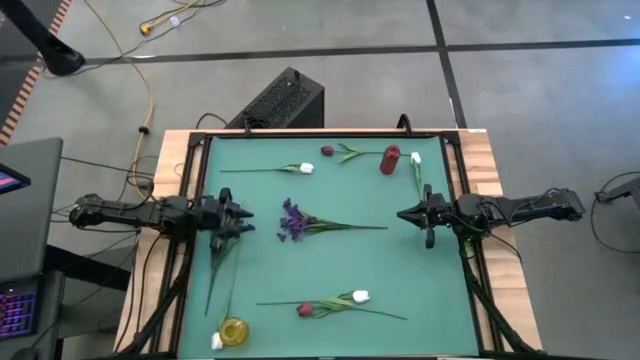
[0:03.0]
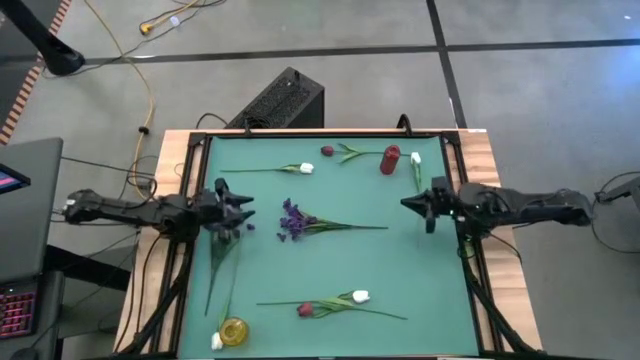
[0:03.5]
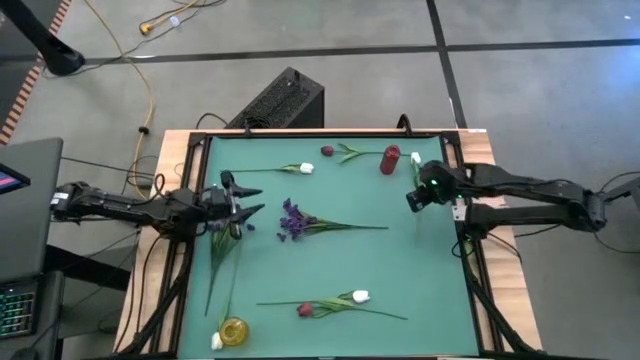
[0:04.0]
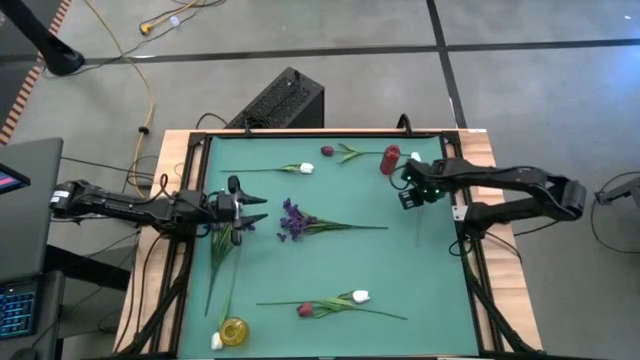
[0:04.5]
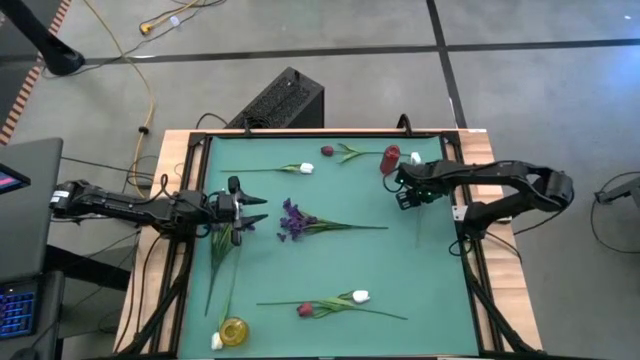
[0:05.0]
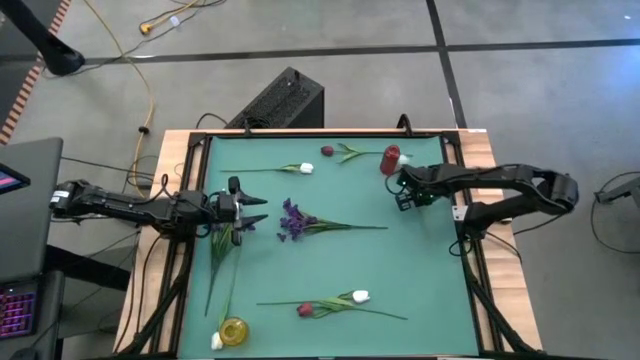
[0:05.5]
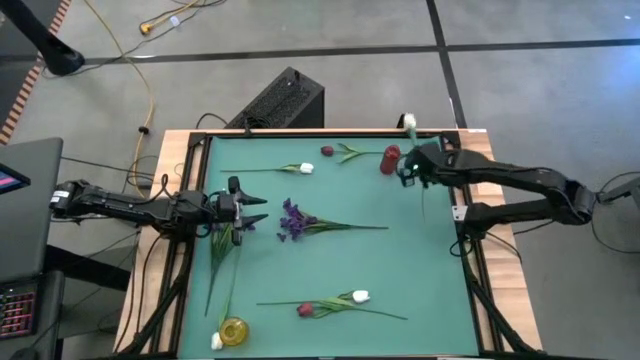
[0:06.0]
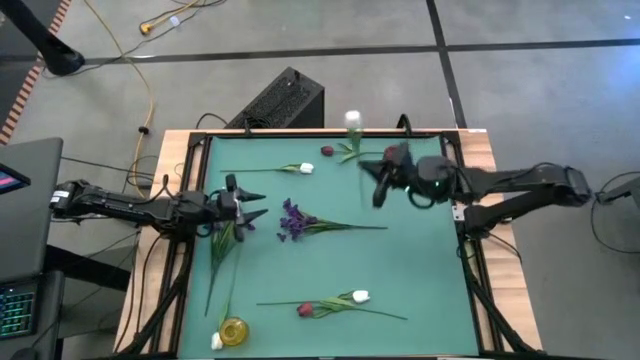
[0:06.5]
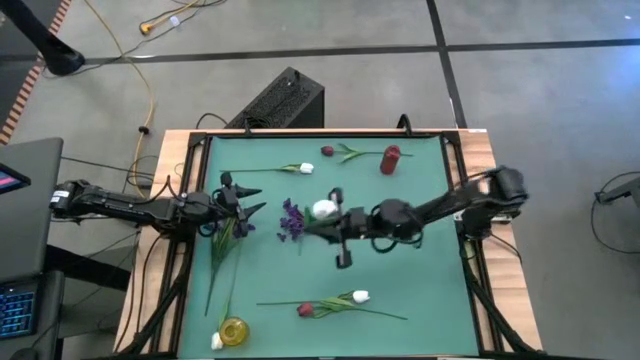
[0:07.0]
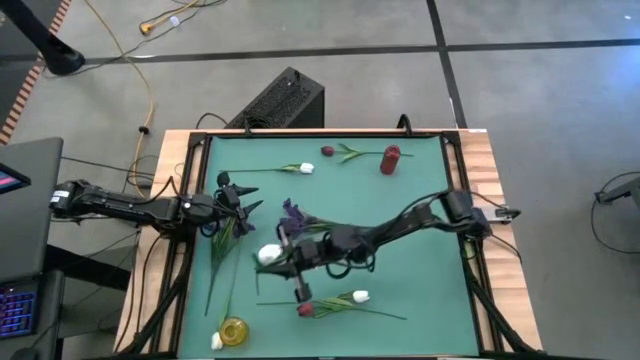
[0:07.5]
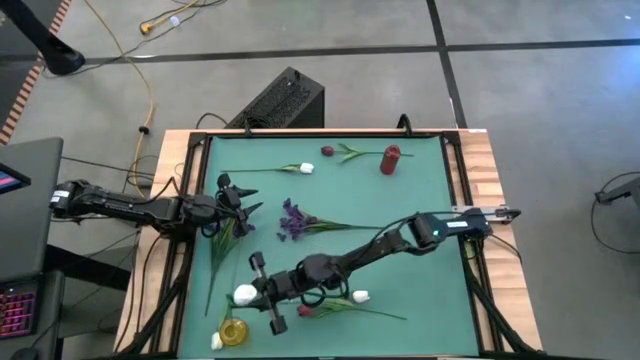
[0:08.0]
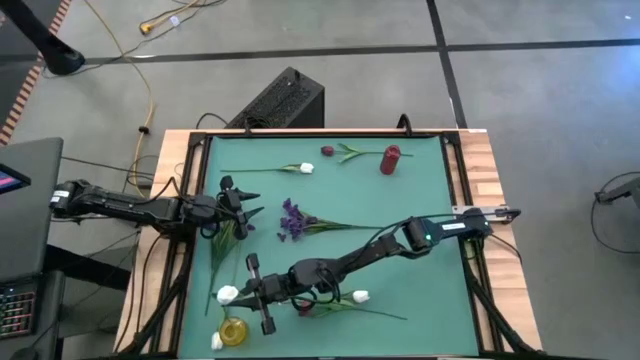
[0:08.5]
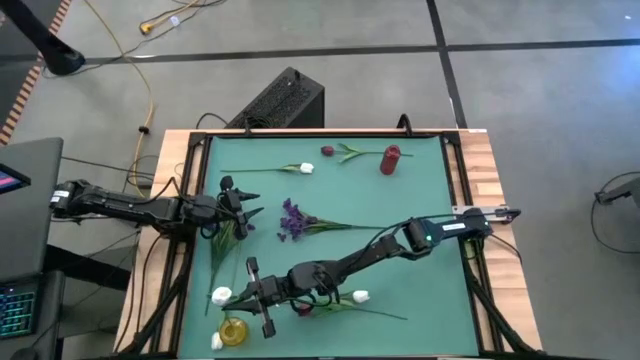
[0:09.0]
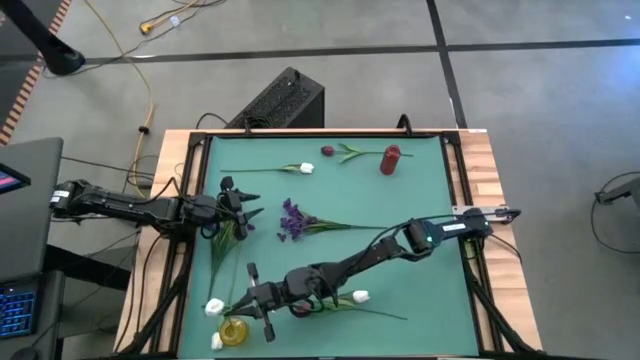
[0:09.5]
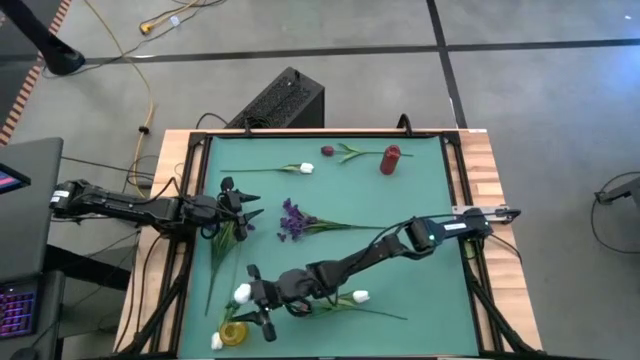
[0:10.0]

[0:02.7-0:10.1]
Task: Sort flowers into vase by color
Put the white tulip into the yellow vase

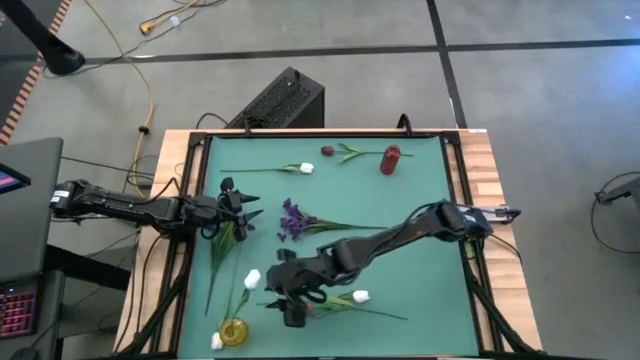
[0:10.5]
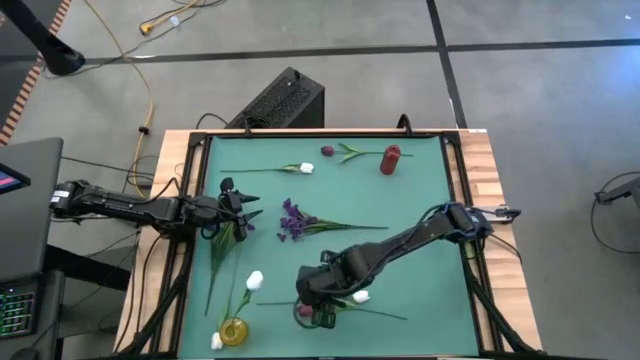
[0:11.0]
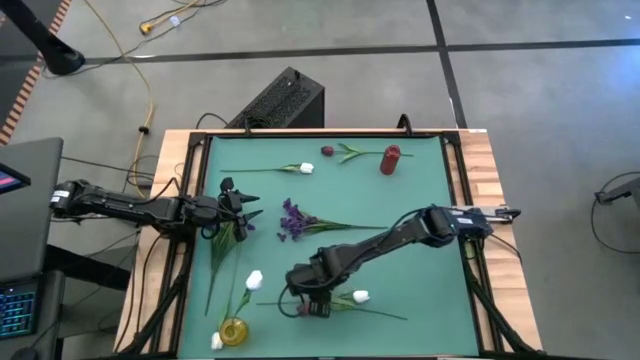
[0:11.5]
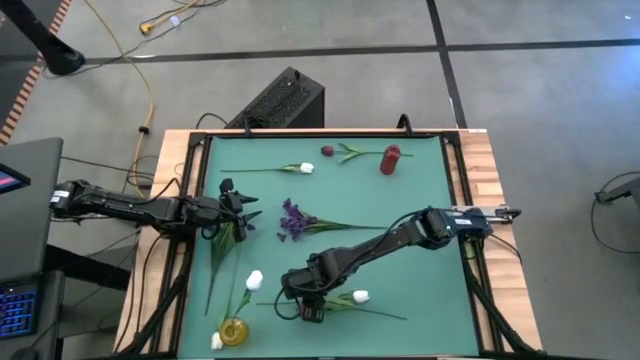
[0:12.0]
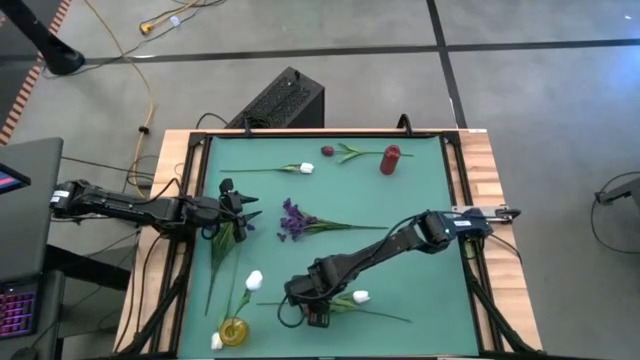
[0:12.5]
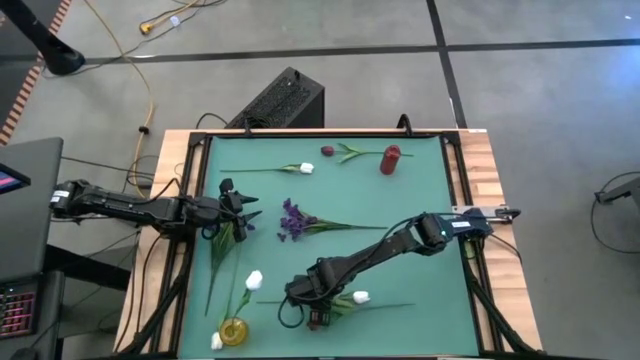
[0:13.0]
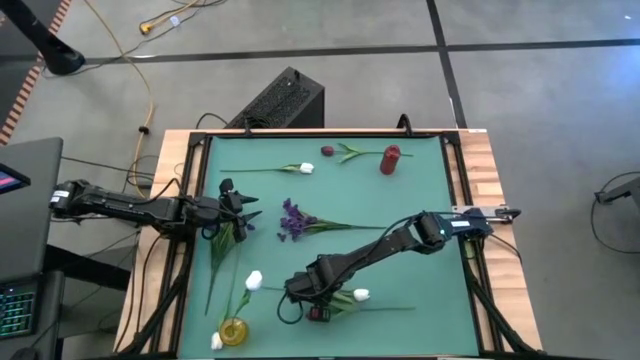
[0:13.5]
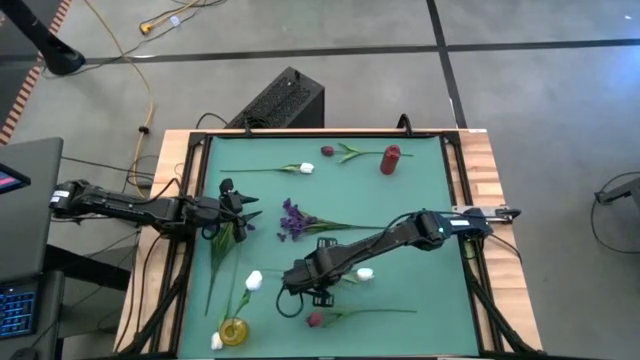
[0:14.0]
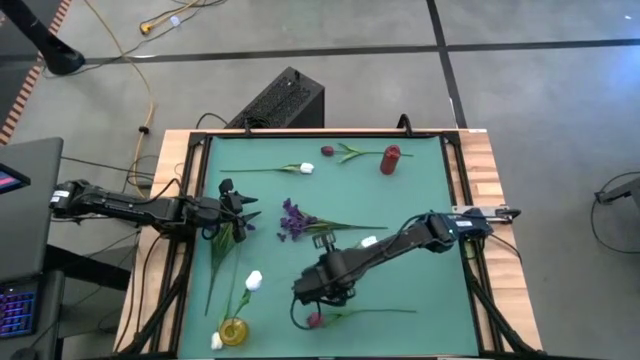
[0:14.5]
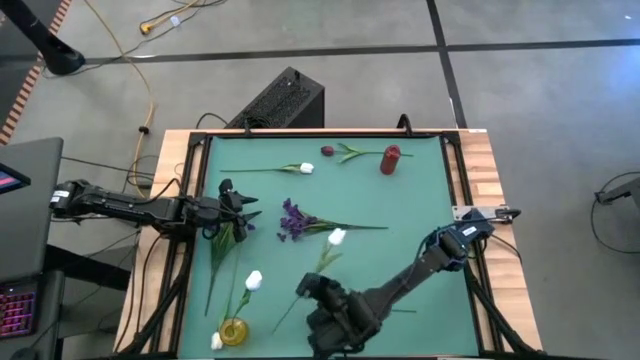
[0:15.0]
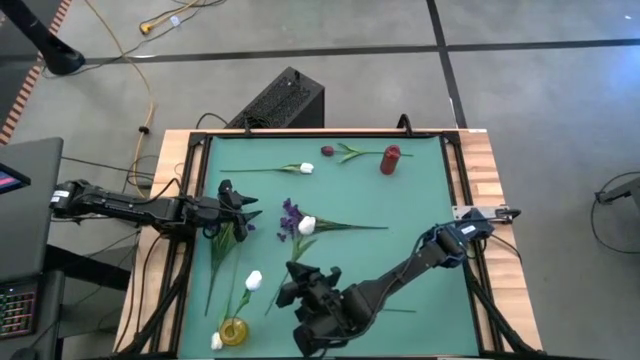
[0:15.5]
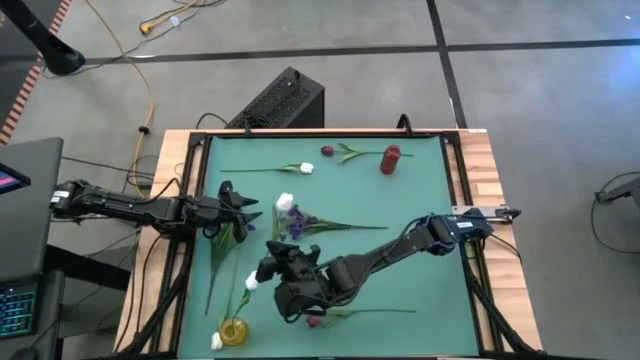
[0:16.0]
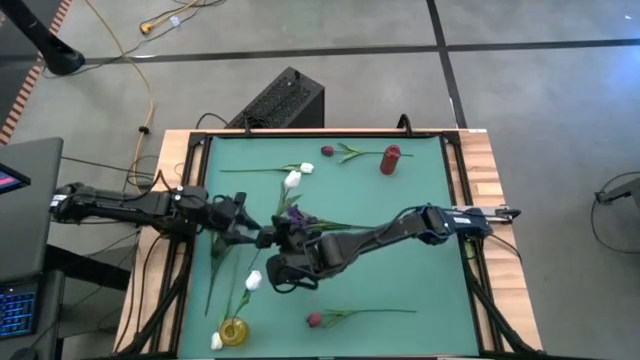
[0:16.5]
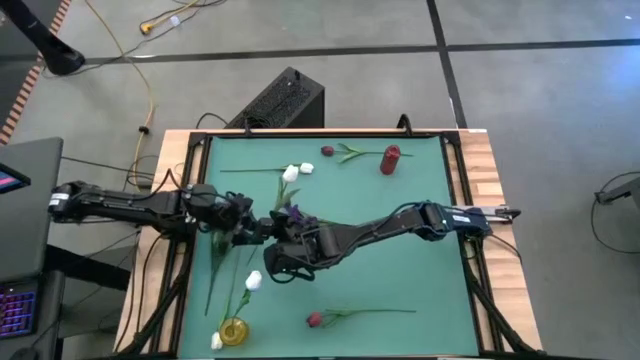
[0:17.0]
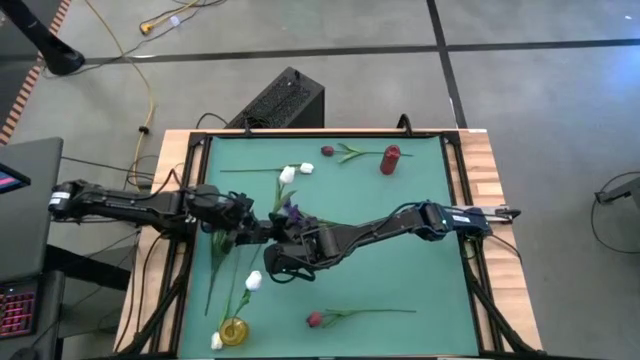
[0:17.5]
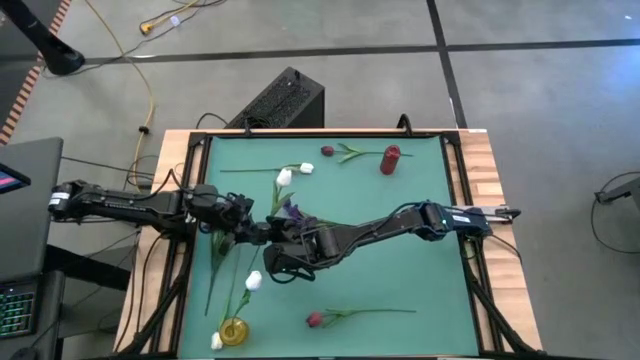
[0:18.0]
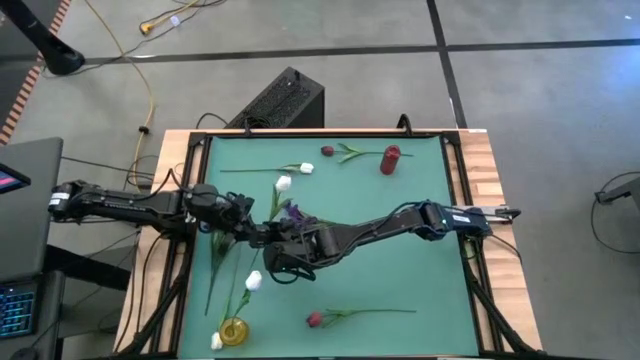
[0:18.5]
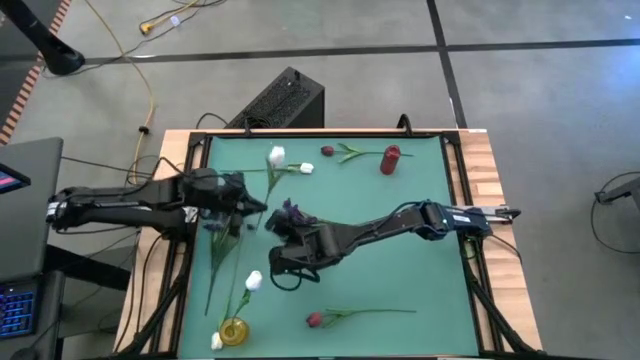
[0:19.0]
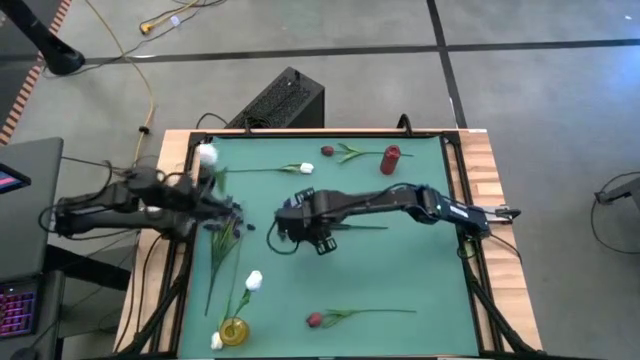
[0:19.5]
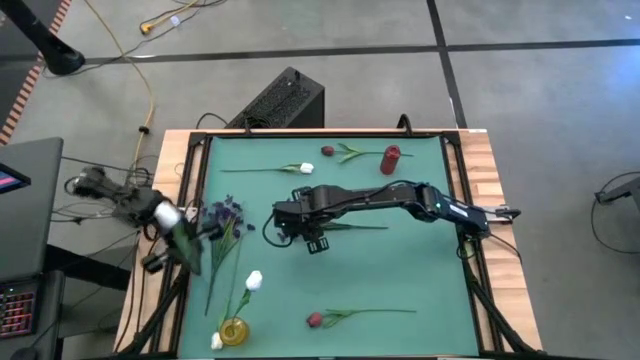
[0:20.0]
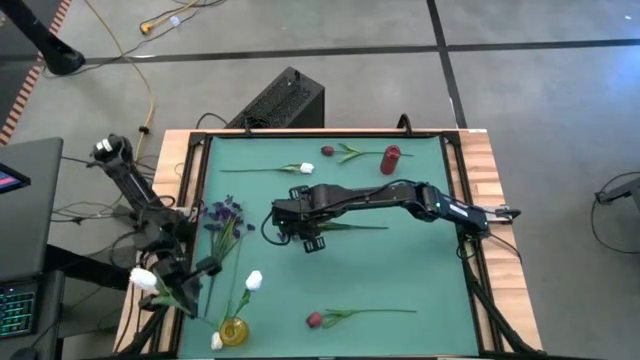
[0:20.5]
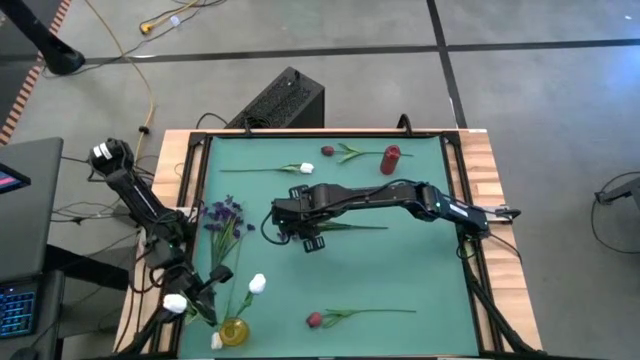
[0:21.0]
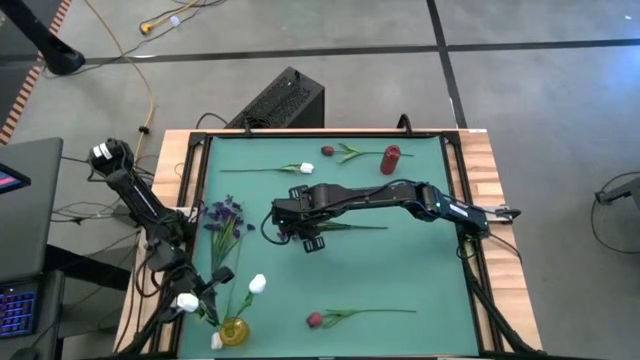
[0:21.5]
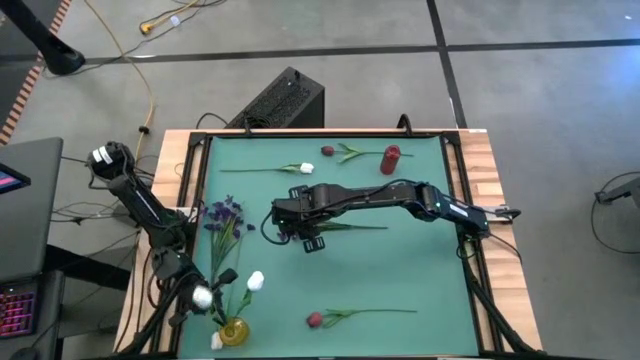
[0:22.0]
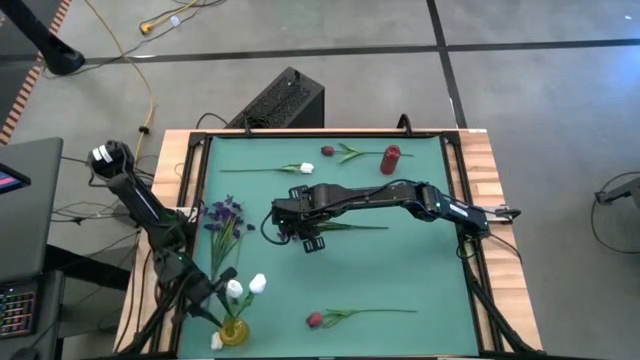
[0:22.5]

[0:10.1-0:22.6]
Put the white tulip into the yellow vase

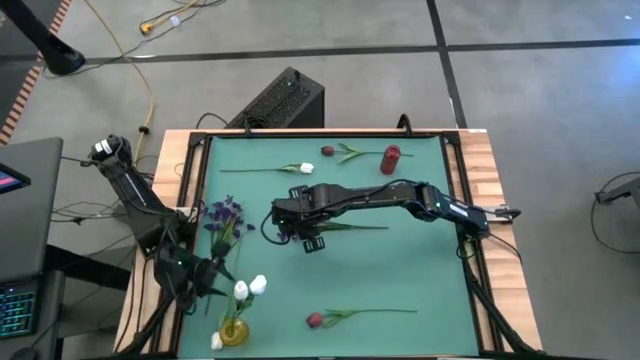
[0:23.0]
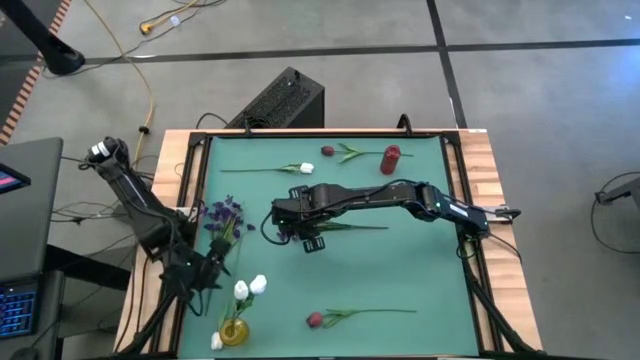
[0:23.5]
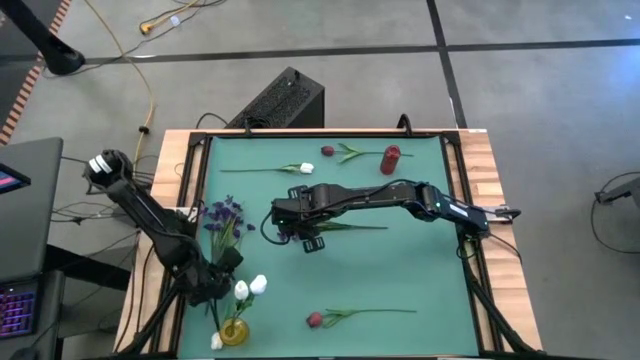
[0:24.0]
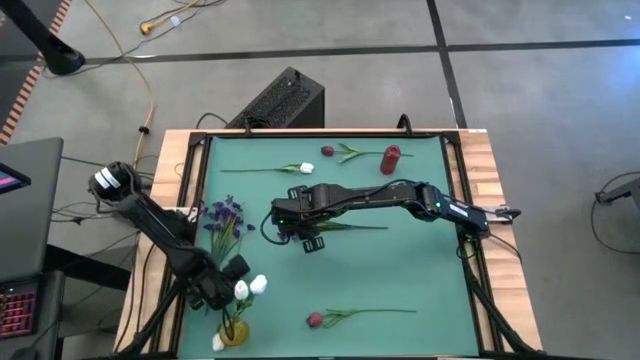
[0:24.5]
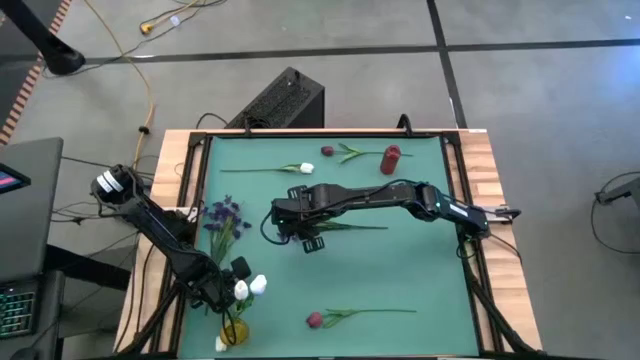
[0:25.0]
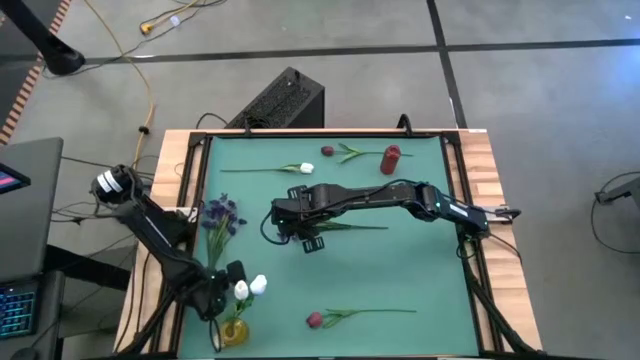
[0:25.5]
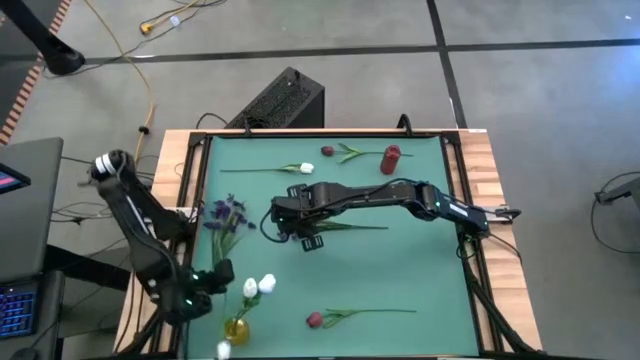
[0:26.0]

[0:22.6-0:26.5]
Put the white tulip into the yellow vase

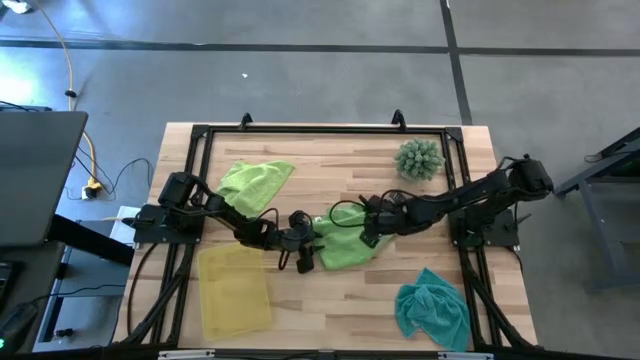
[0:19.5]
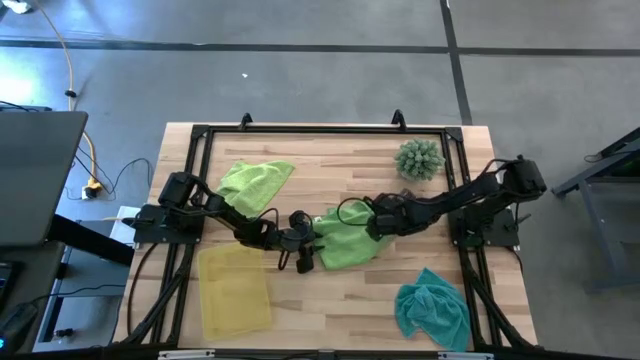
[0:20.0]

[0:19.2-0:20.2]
Task: Roll microfiber towels into tight, uniform cylinder then place into a basket
Fold the green microfiber towel
